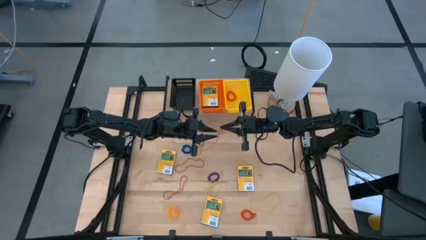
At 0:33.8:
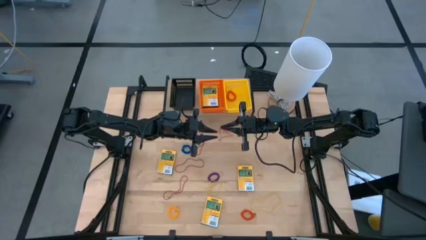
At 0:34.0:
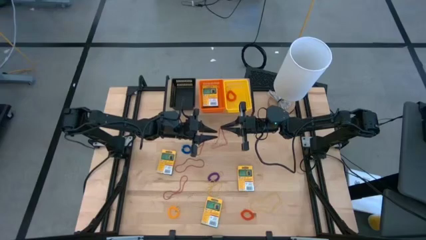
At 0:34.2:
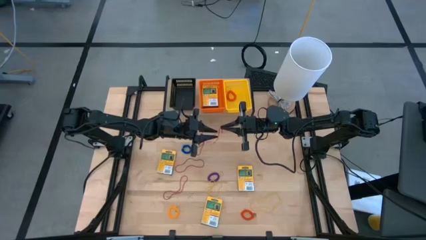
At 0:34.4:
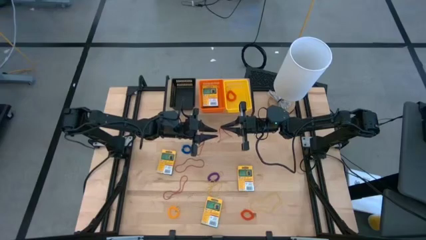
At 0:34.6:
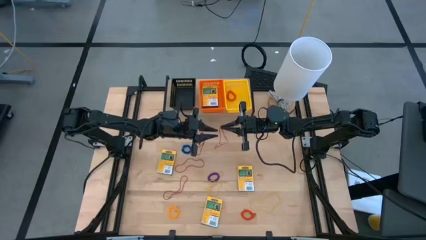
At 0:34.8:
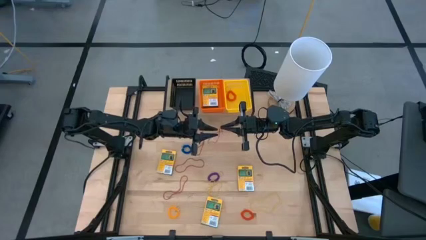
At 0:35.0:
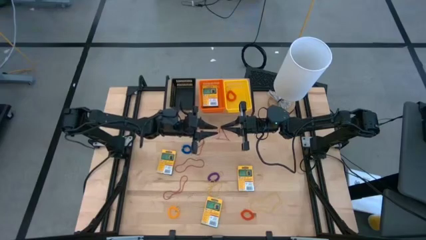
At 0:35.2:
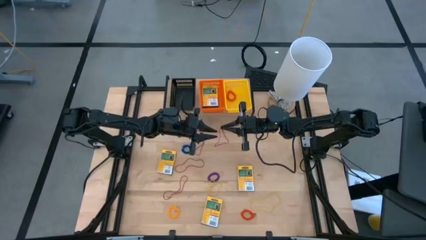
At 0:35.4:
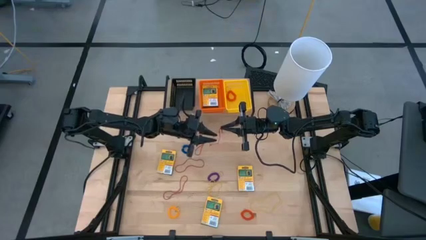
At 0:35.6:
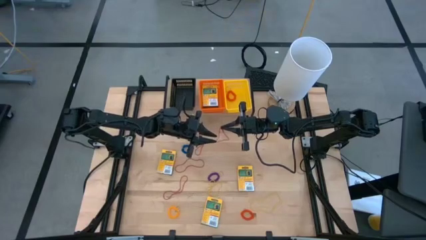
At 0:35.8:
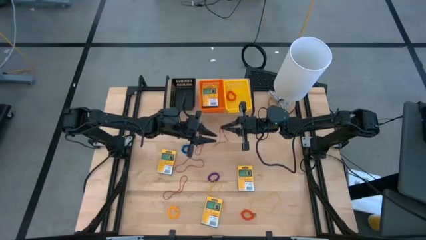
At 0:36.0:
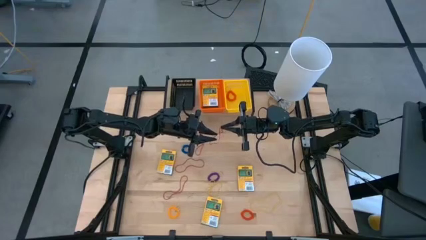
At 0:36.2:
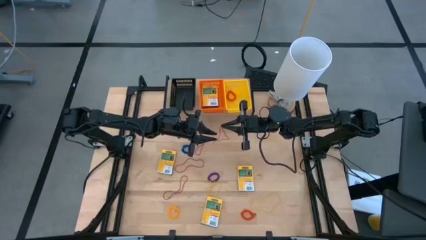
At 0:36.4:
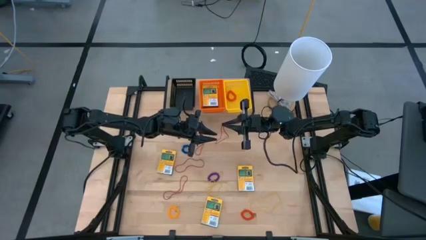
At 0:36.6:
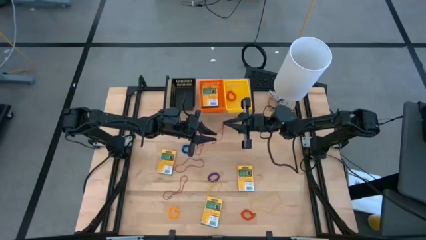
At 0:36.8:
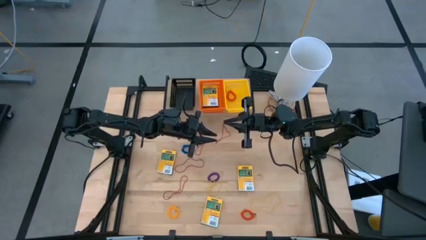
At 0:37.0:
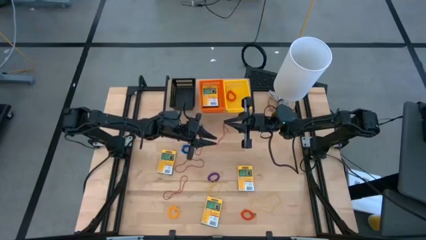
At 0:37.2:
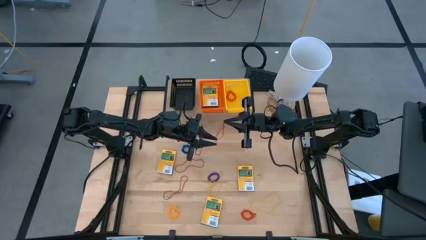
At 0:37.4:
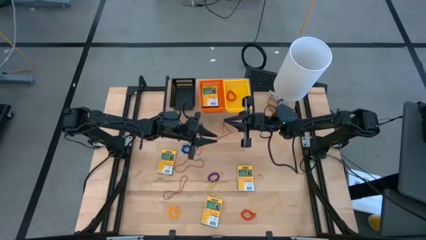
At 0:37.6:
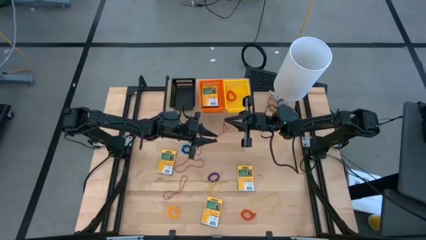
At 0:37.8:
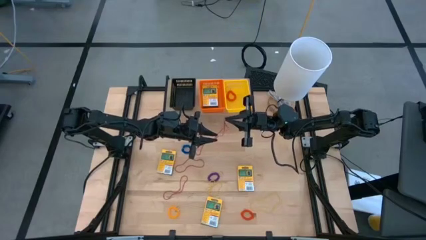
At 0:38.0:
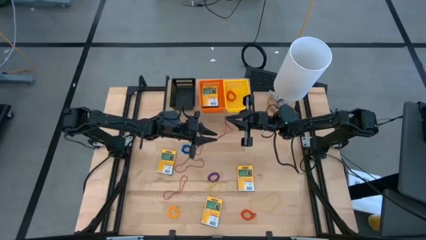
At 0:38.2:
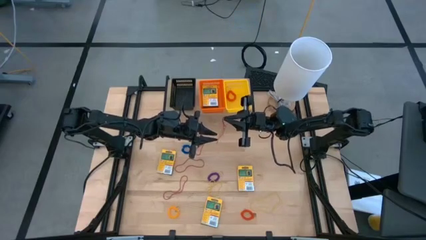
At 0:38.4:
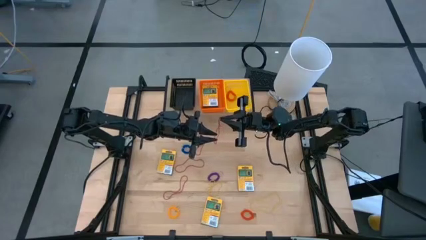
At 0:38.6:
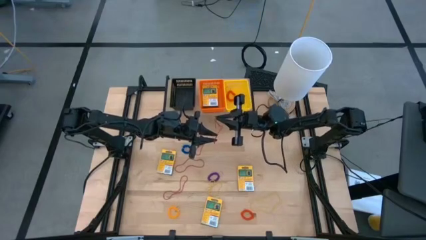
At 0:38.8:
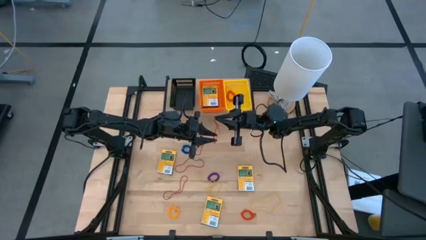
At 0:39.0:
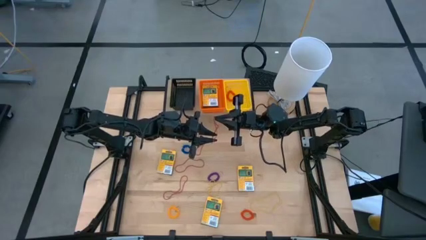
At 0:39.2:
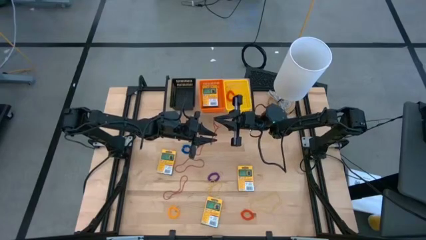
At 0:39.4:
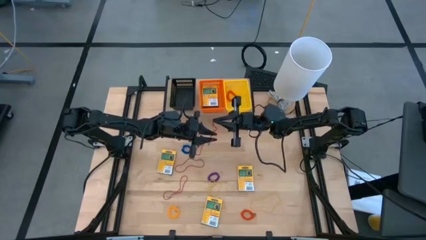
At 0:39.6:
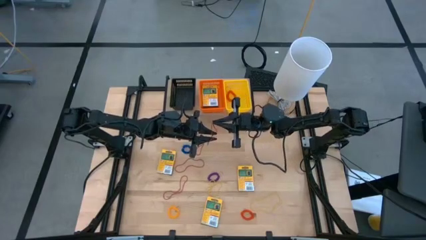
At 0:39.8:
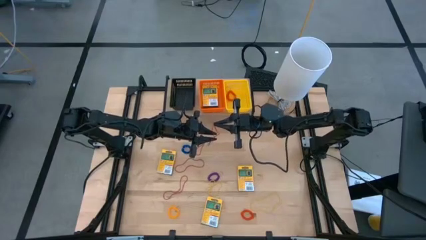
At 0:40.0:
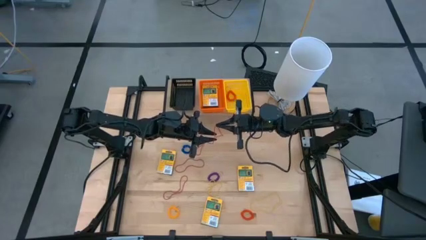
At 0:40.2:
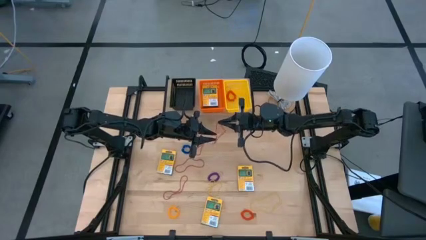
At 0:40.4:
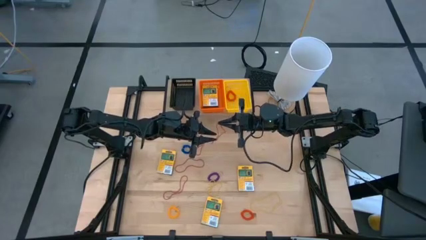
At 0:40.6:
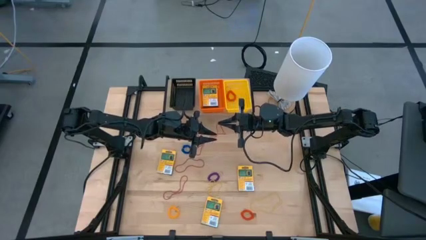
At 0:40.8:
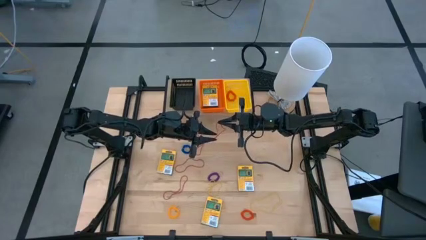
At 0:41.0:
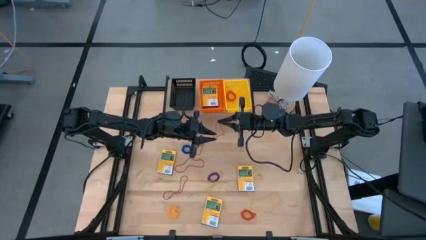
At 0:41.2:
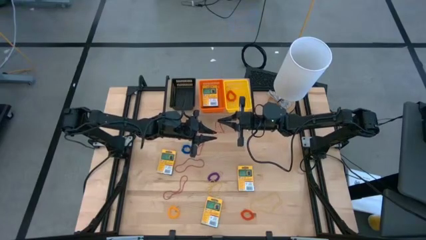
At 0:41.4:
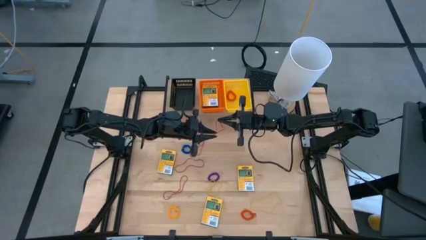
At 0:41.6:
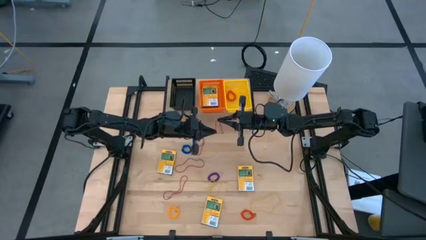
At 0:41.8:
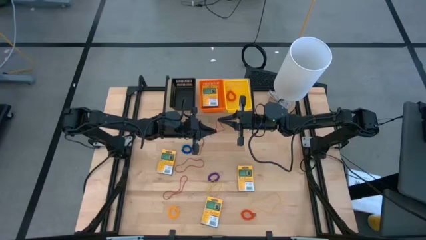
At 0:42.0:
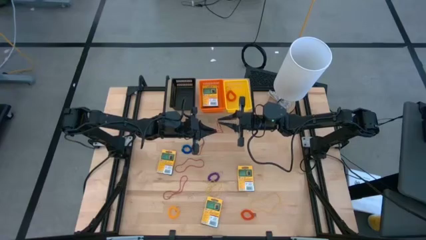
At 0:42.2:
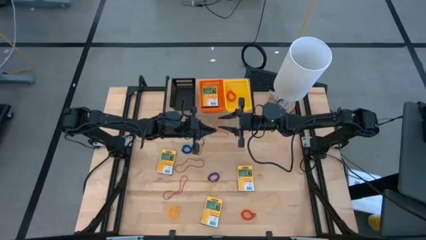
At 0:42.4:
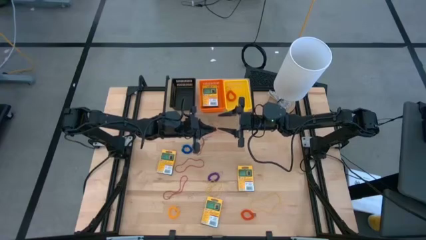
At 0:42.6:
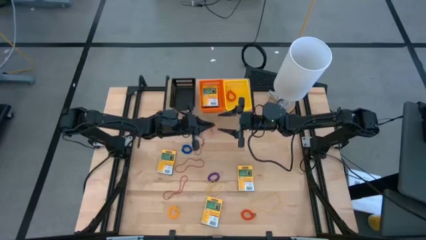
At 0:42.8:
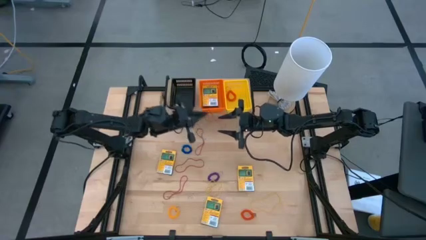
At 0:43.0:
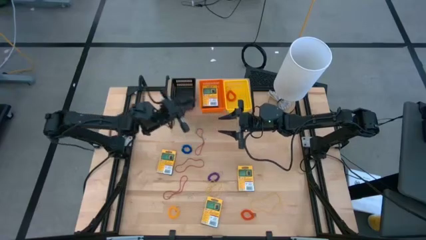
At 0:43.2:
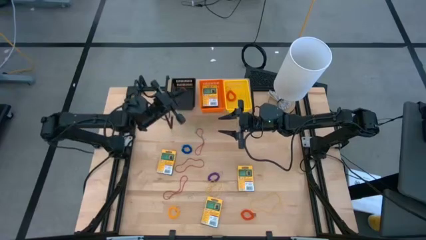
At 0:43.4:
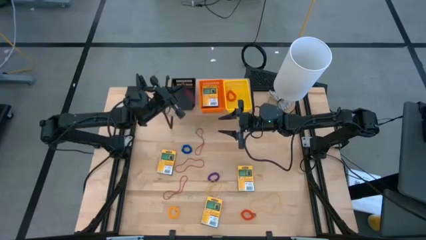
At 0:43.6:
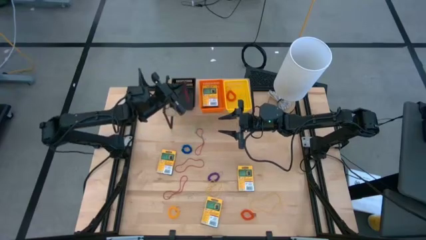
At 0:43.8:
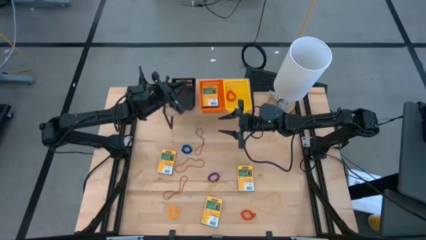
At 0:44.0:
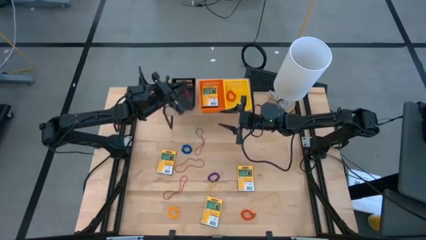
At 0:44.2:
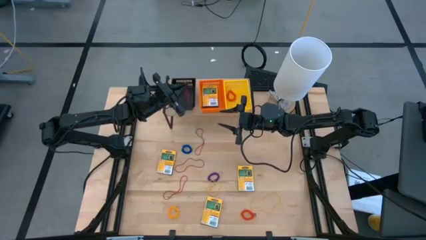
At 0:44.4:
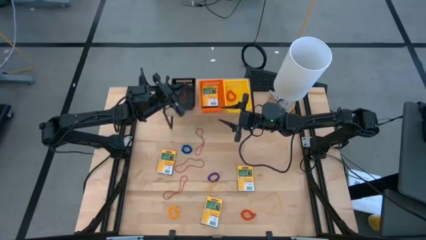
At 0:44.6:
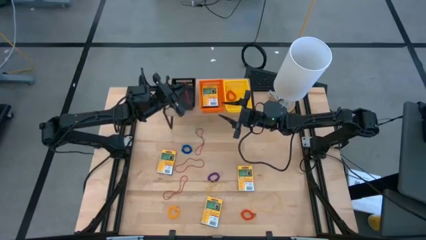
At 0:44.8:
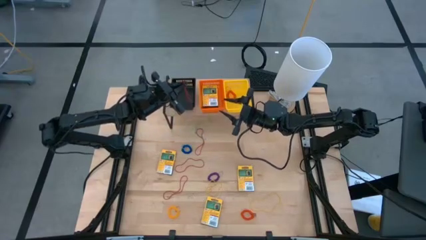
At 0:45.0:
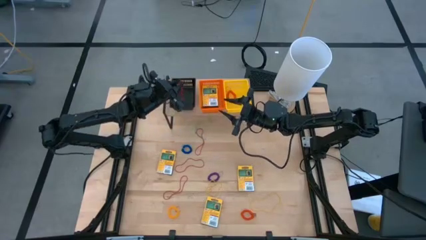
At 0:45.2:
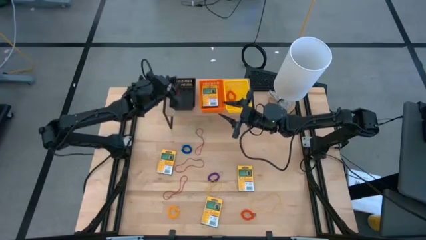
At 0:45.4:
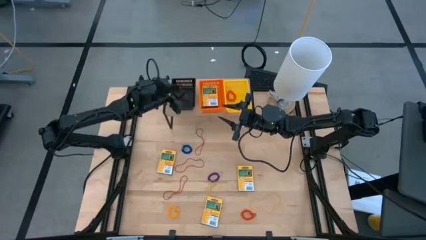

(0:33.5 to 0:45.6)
Task: Pick & Place Office Desk Supplies
Put the red rubberband into the black bin on the shelf

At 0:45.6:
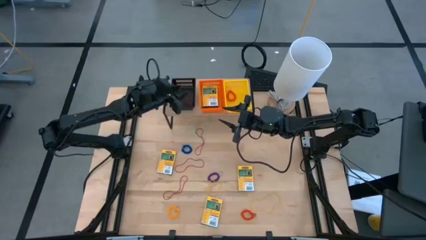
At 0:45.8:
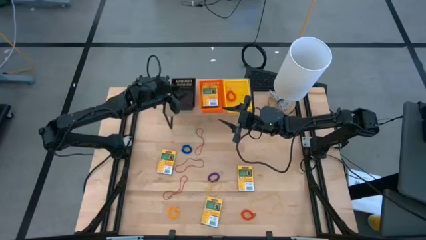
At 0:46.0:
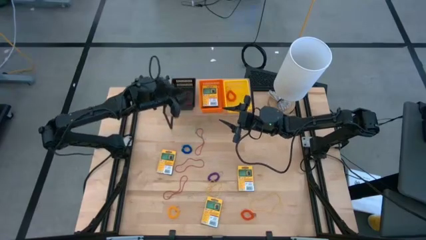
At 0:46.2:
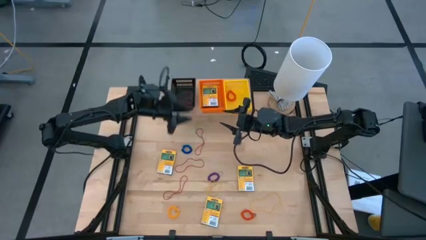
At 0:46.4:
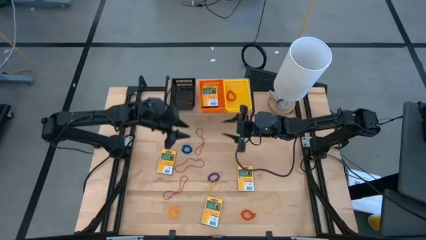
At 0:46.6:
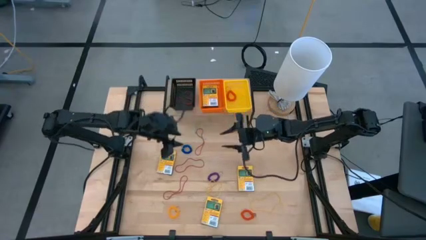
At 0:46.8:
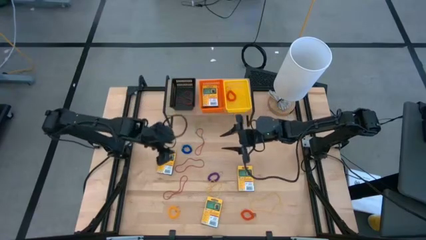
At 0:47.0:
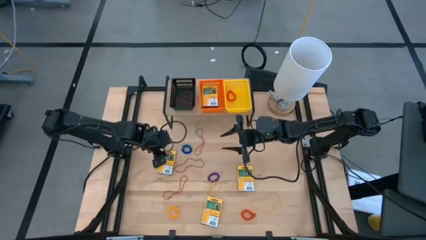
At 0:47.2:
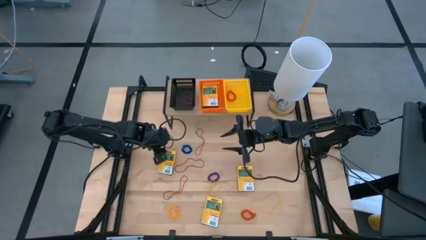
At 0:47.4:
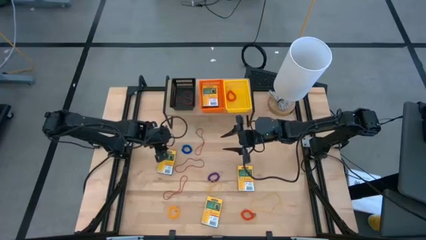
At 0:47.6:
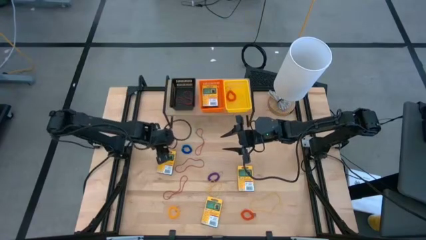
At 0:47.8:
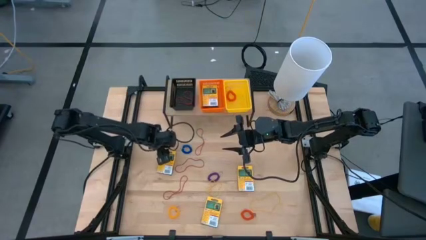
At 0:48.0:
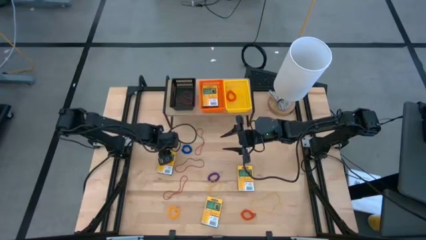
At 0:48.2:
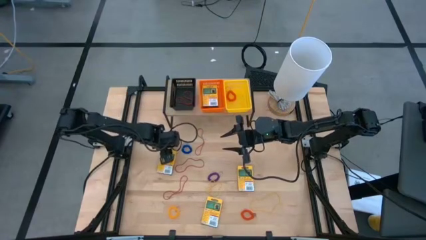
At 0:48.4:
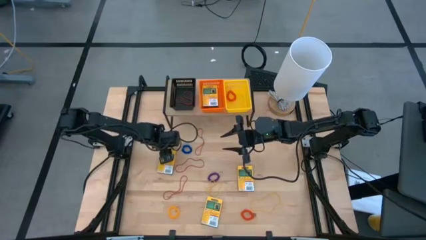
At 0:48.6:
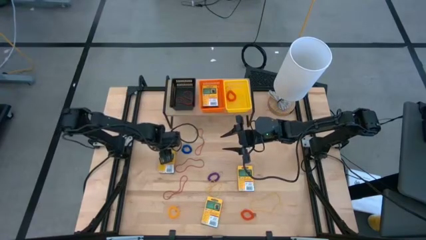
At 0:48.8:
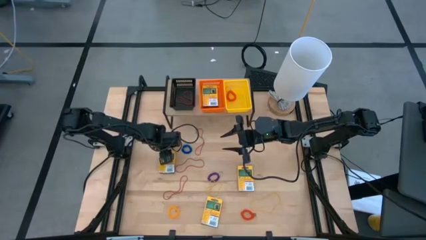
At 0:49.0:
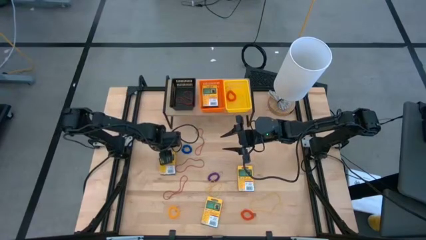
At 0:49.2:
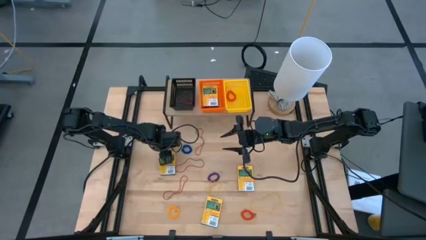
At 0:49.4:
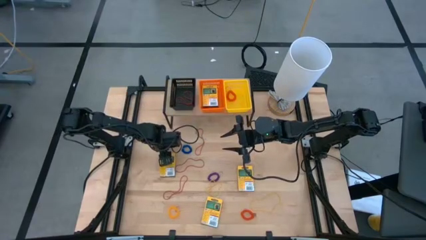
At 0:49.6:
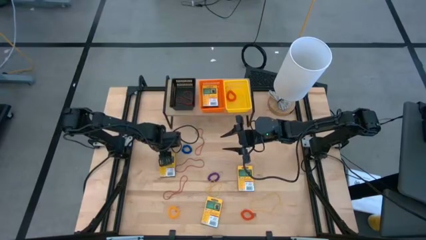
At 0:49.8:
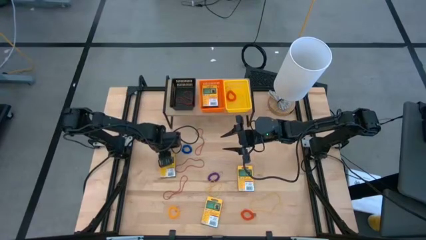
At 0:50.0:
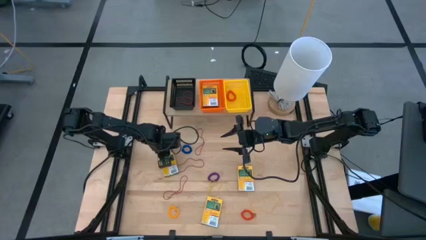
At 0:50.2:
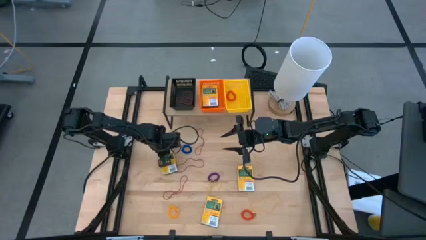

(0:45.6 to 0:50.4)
Put the yellow crayon box into the orange bin on the shelf
